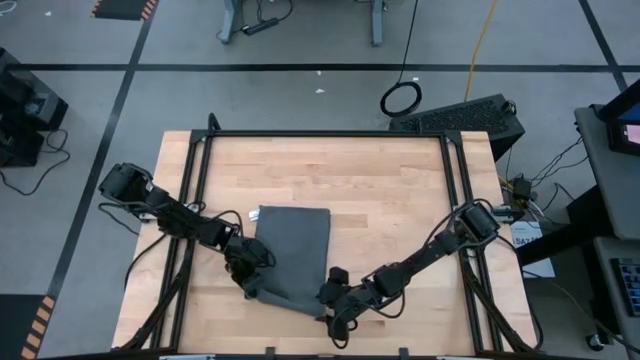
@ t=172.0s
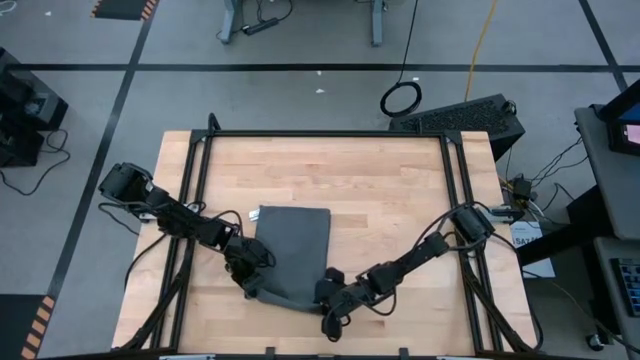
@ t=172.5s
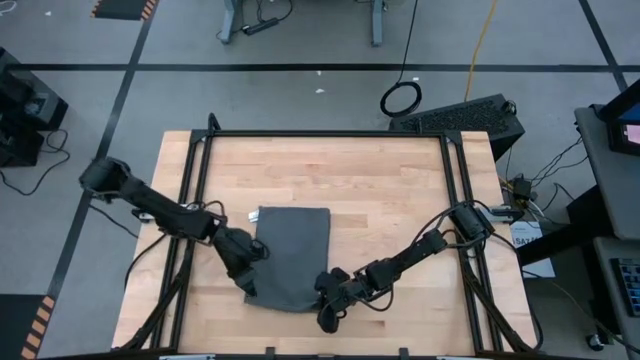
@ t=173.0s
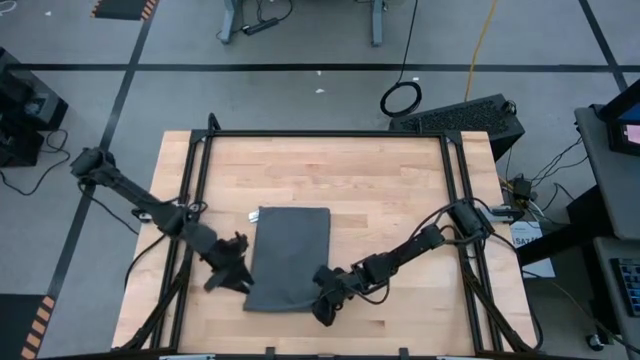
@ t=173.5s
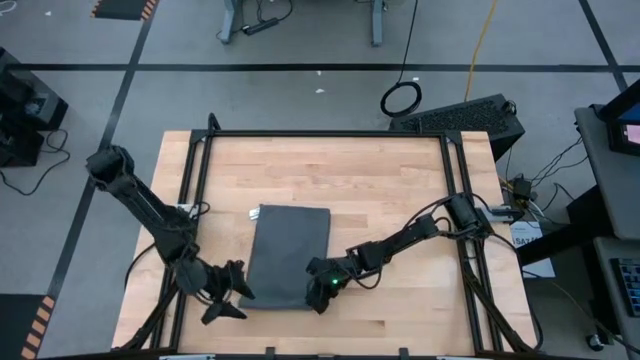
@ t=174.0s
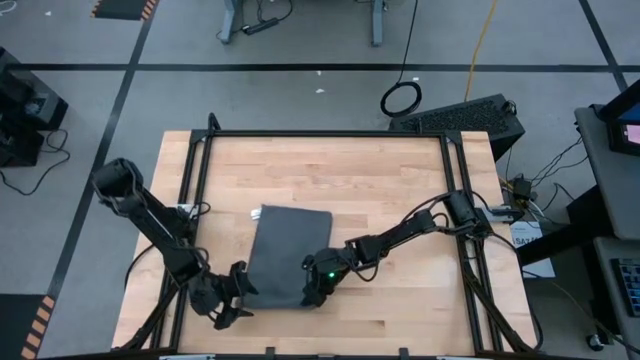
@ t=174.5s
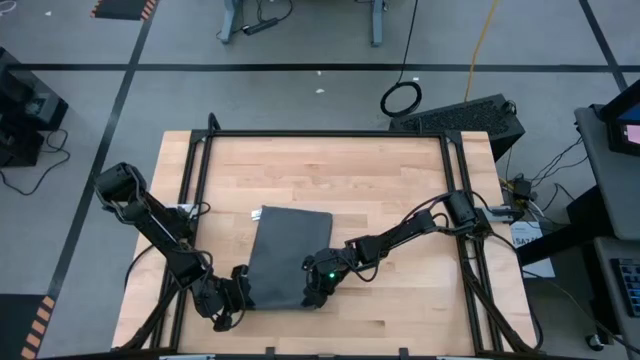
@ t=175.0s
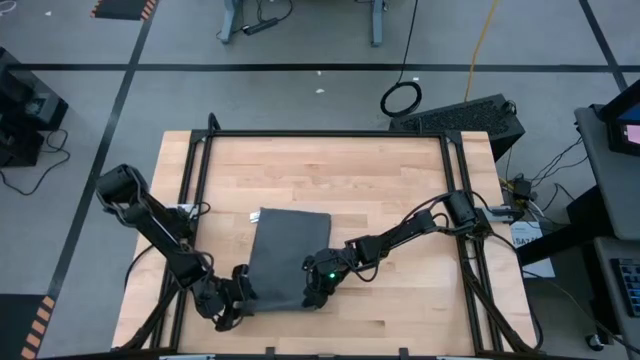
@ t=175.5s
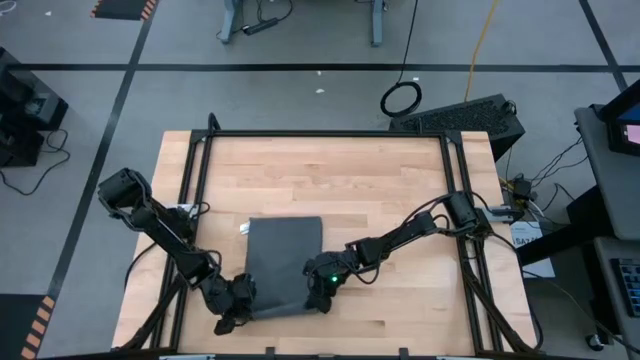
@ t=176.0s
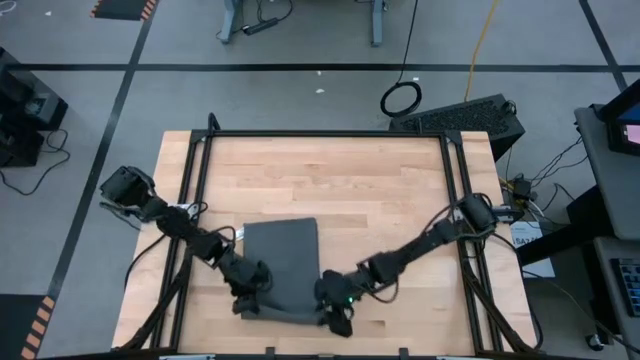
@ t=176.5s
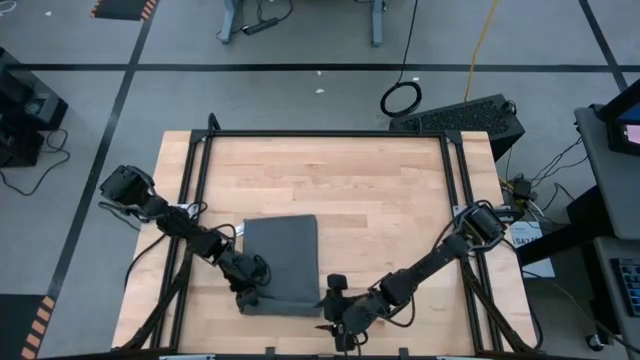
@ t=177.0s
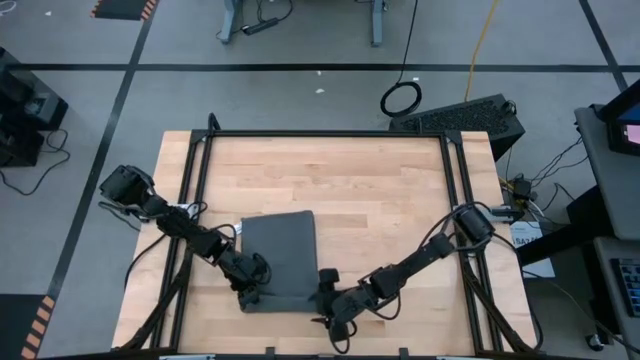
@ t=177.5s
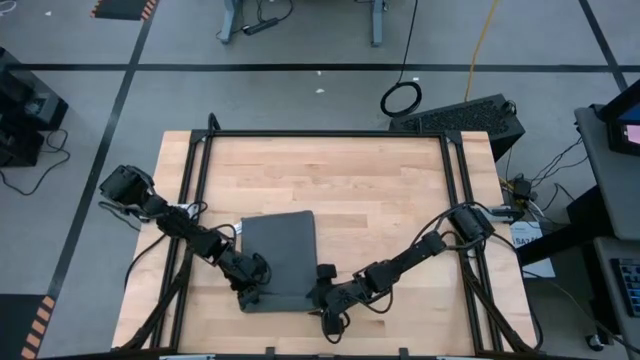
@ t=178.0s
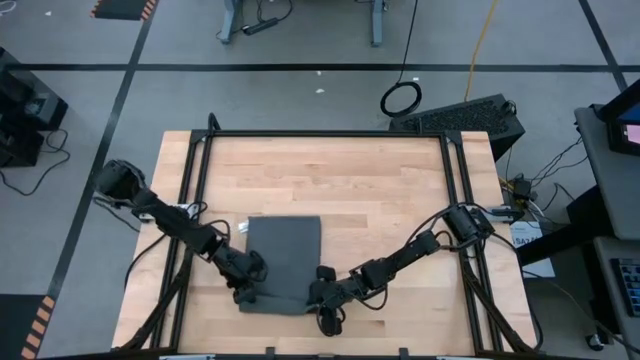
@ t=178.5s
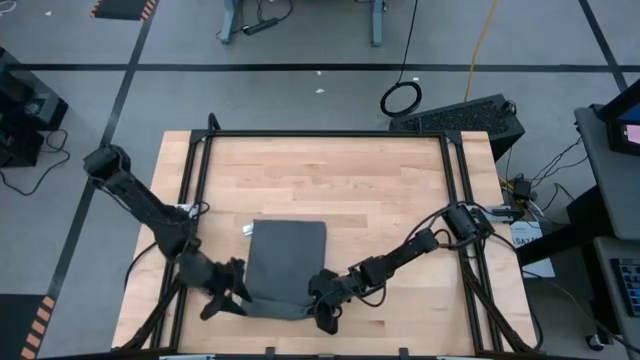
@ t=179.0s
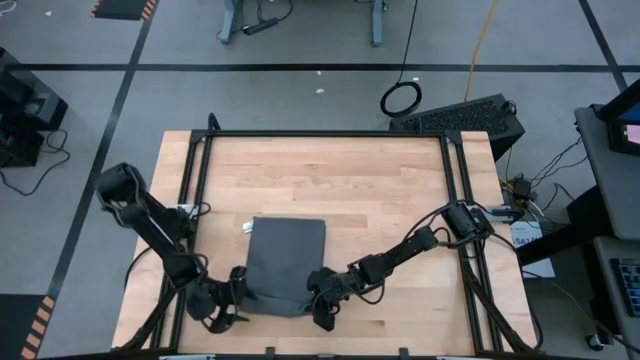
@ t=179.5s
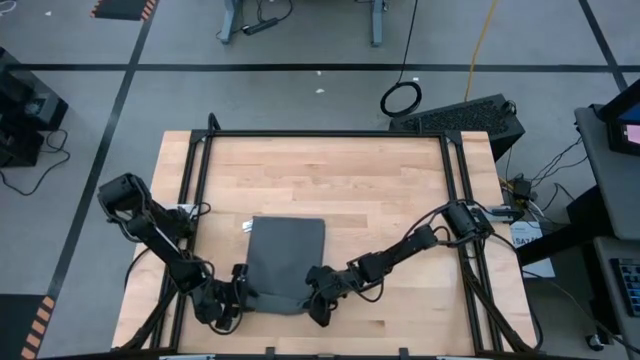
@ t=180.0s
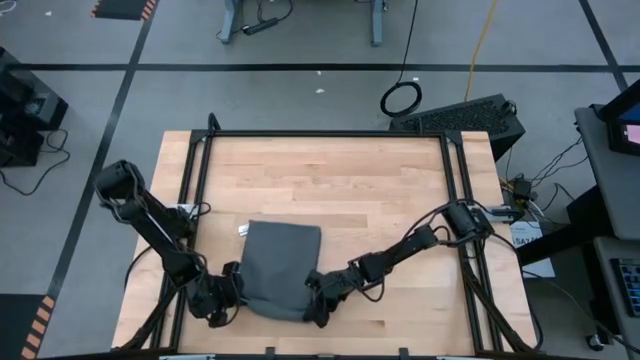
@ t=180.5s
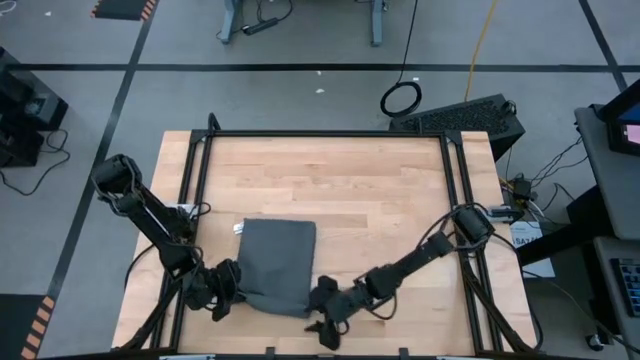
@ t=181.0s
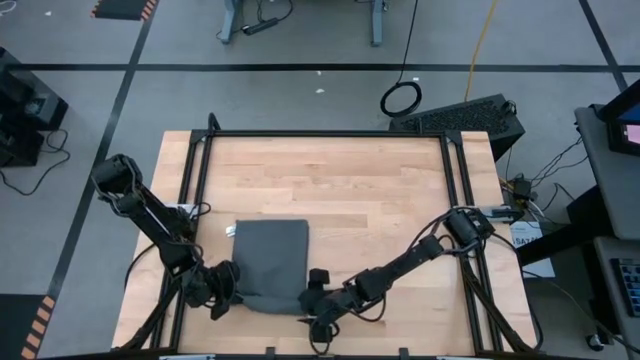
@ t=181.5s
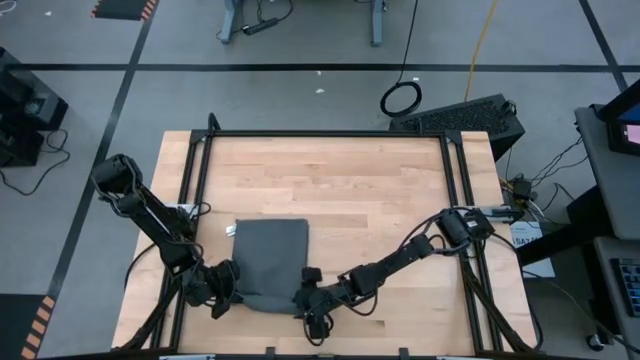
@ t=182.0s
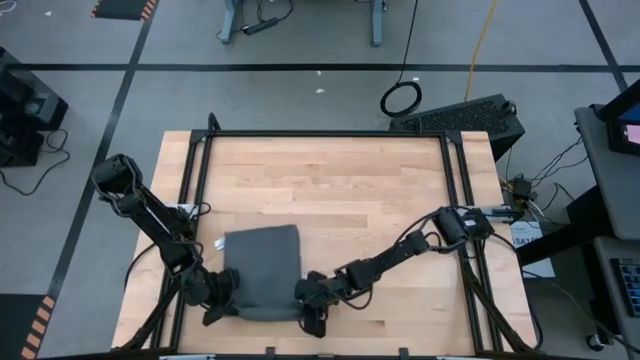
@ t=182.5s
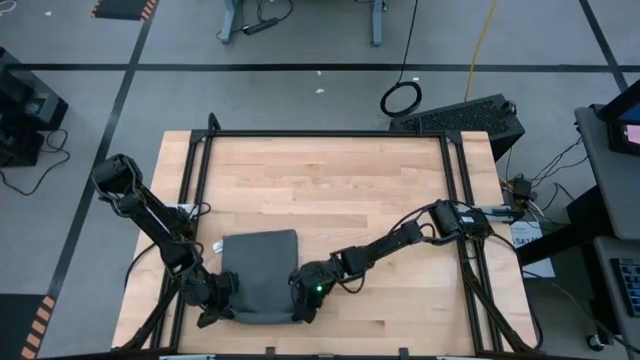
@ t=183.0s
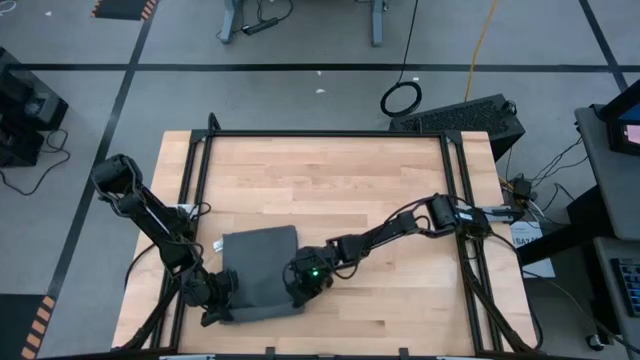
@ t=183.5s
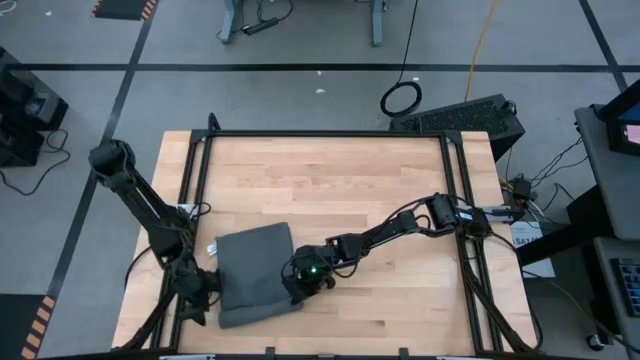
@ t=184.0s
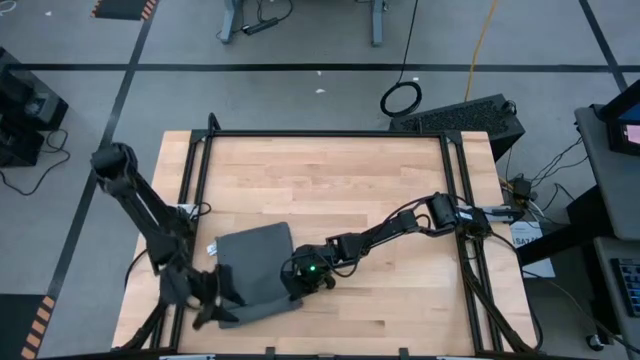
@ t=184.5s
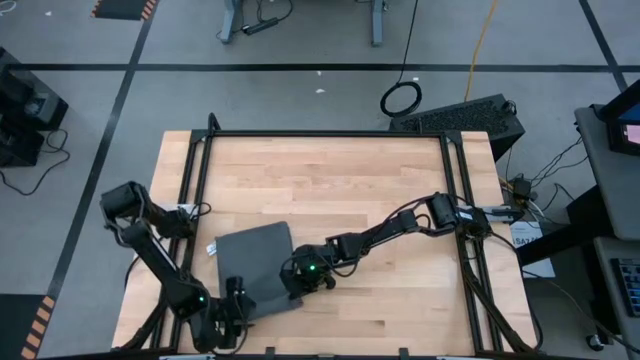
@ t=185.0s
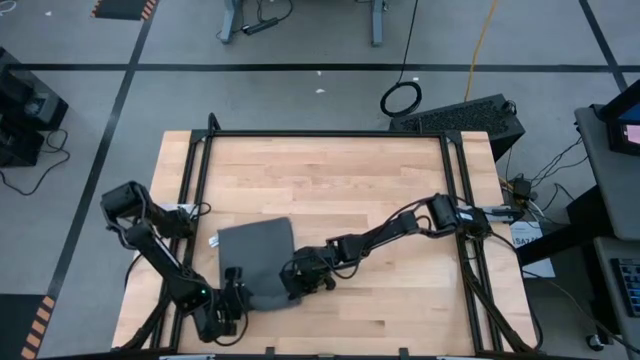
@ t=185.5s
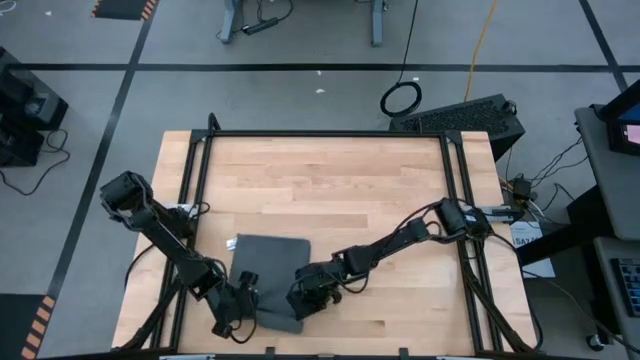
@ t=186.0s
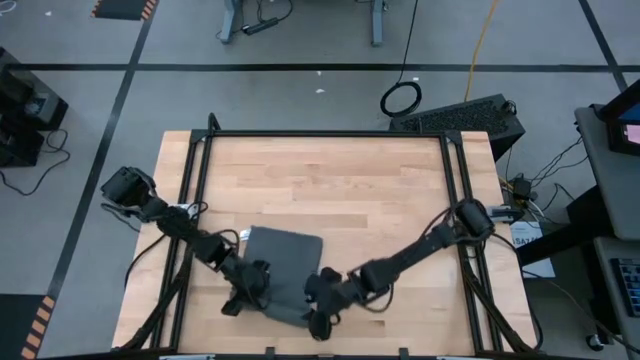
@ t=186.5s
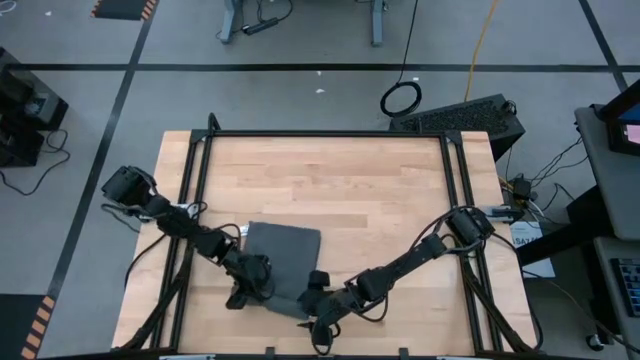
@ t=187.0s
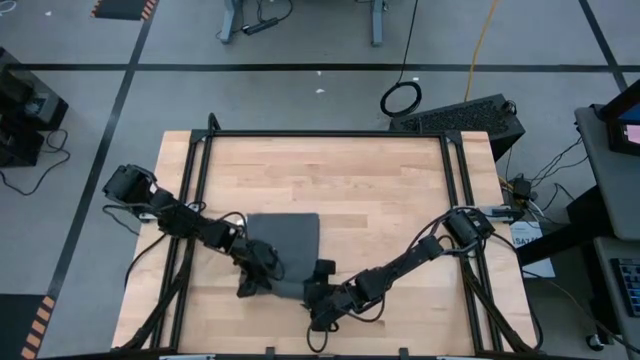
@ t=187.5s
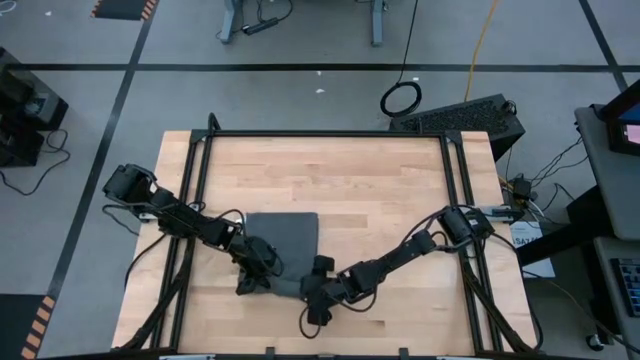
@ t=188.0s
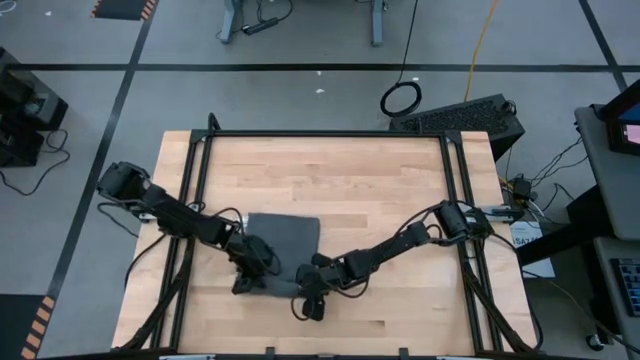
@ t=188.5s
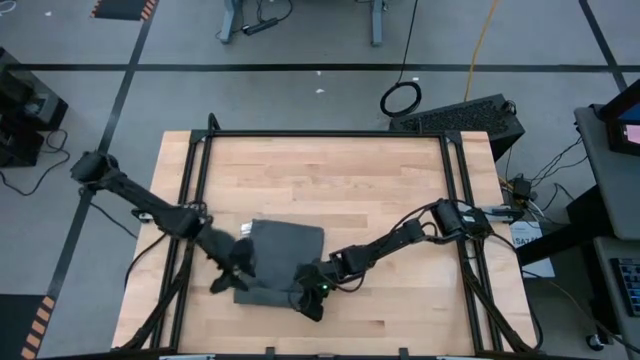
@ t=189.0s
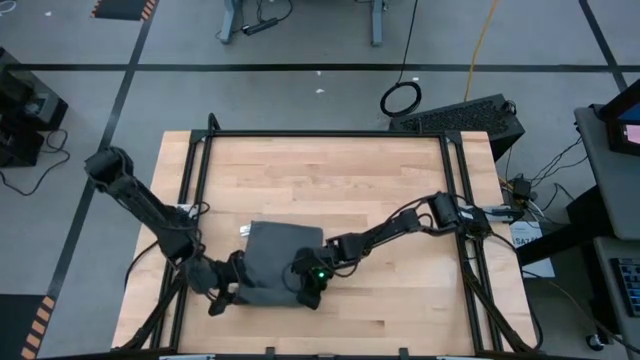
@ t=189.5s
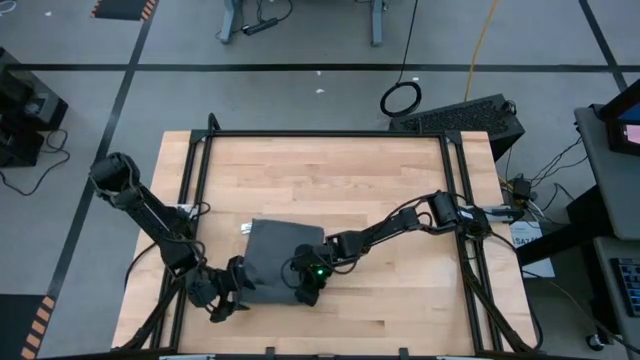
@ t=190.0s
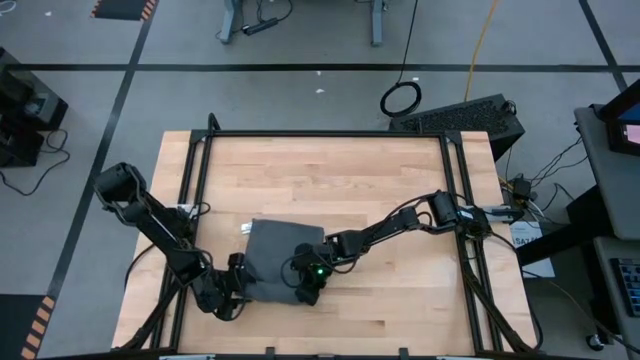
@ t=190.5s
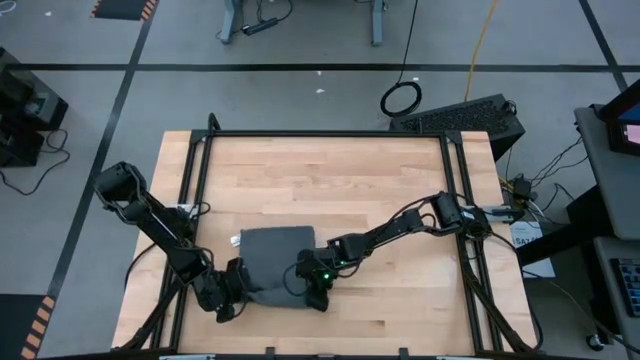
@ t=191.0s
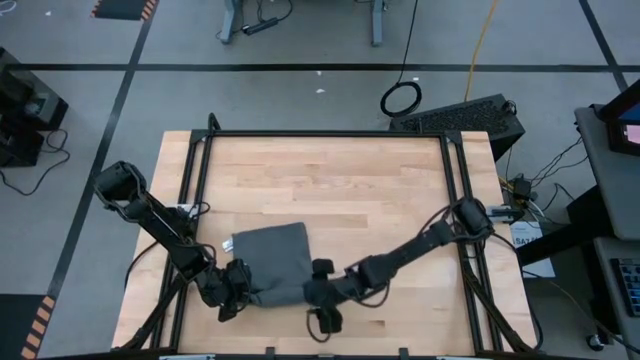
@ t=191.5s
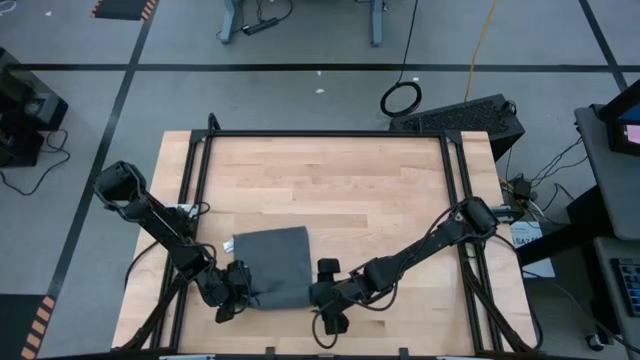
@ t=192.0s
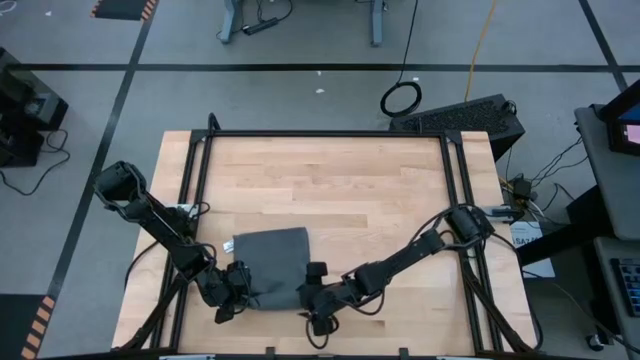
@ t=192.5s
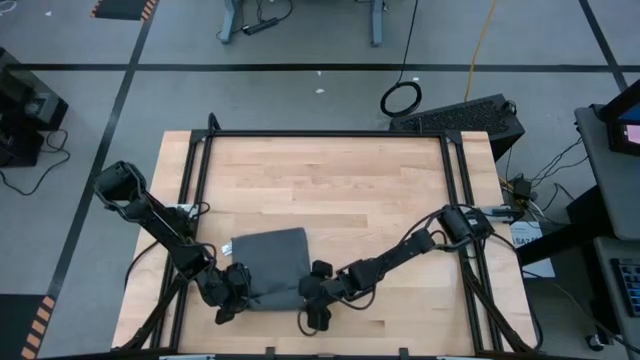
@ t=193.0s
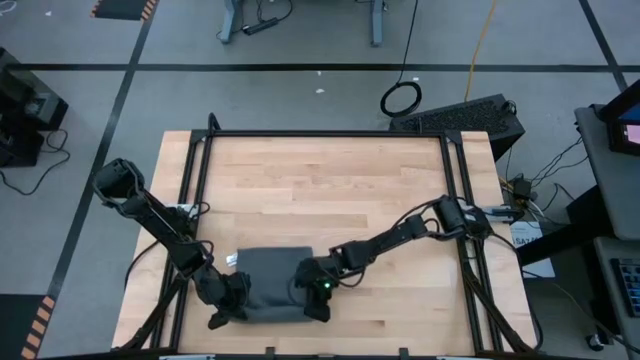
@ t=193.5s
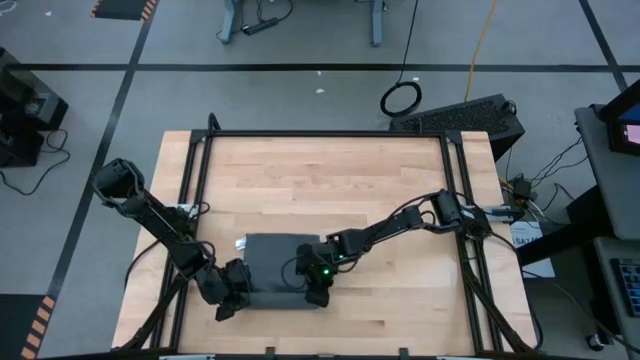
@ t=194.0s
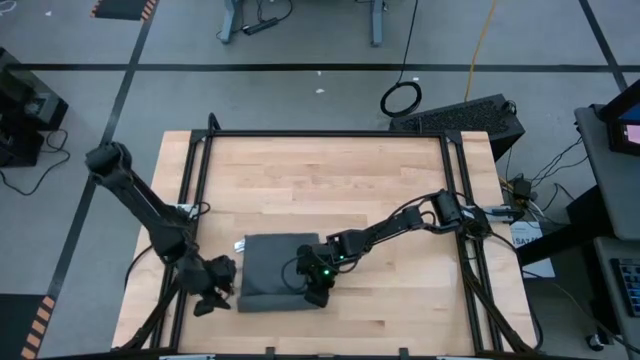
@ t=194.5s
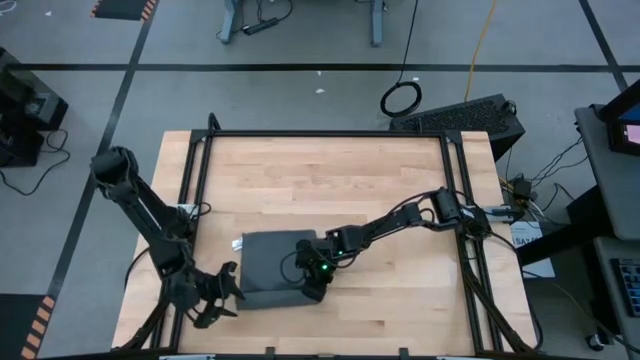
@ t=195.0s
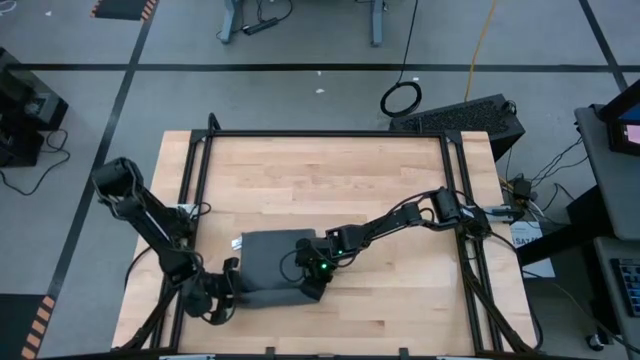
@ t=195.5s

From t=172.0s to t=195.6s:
Task: Roll towel into tight, uniform cylinder
Roll the gray towel
